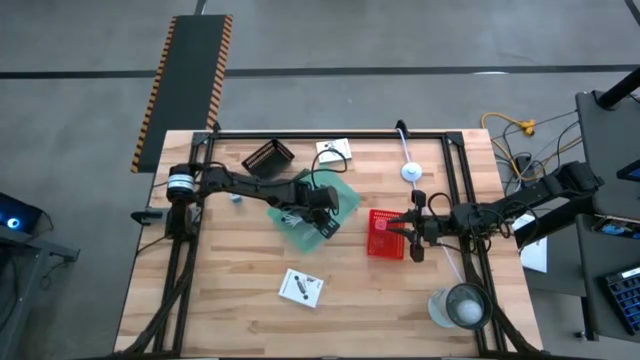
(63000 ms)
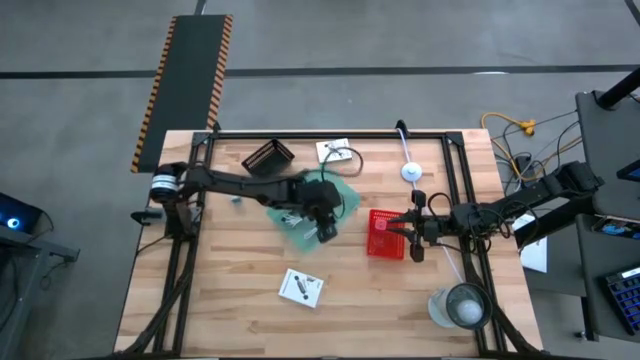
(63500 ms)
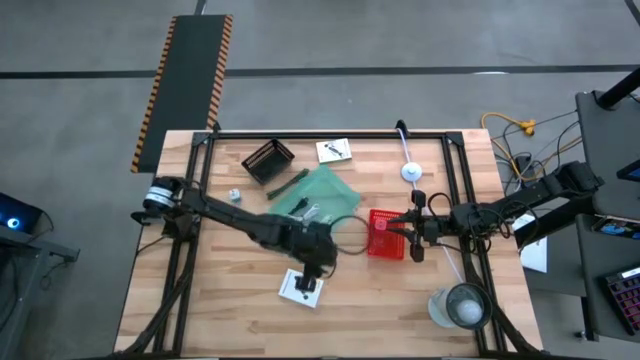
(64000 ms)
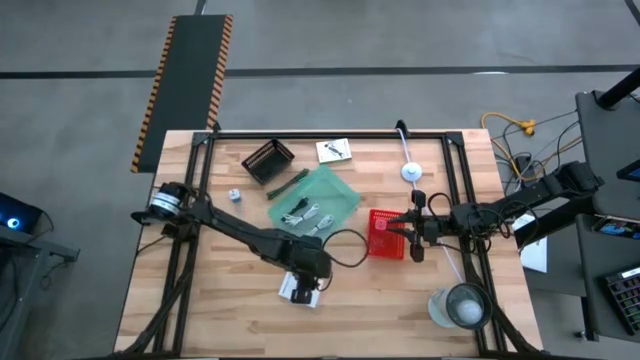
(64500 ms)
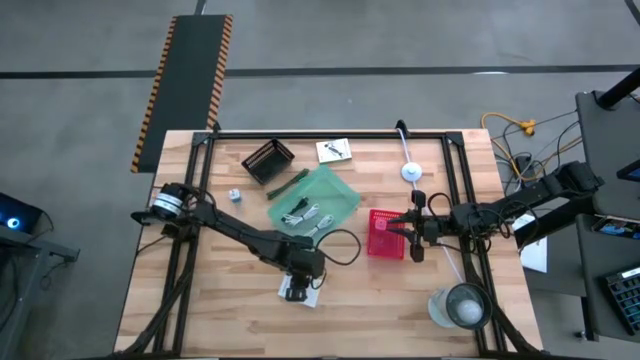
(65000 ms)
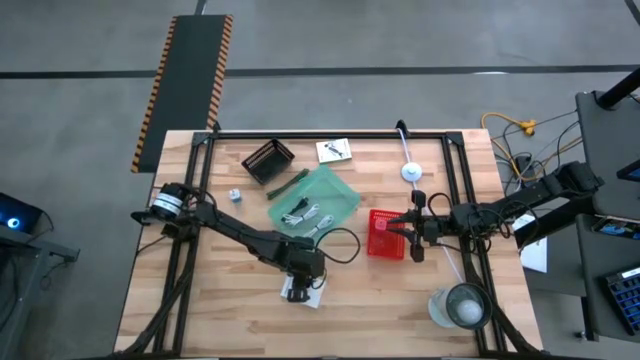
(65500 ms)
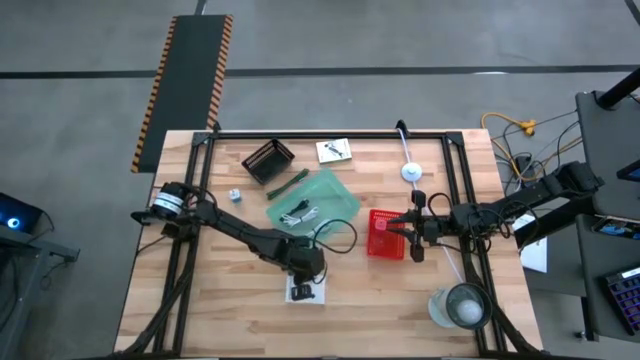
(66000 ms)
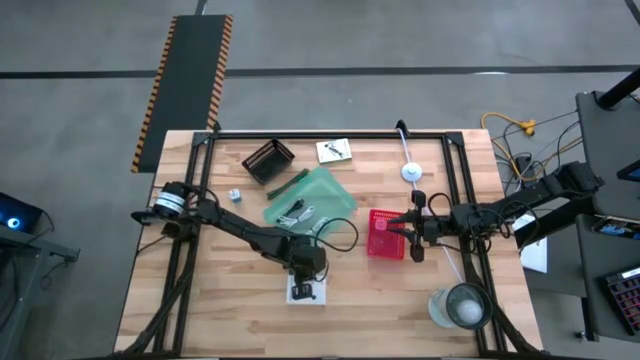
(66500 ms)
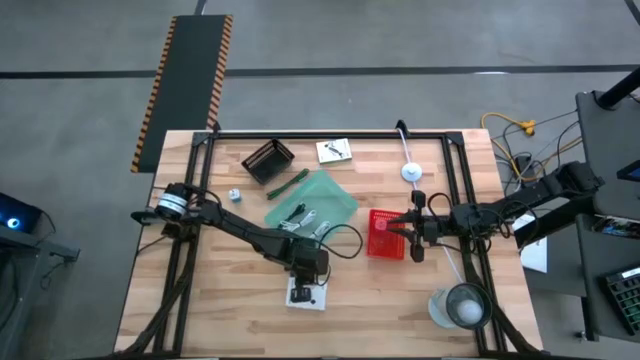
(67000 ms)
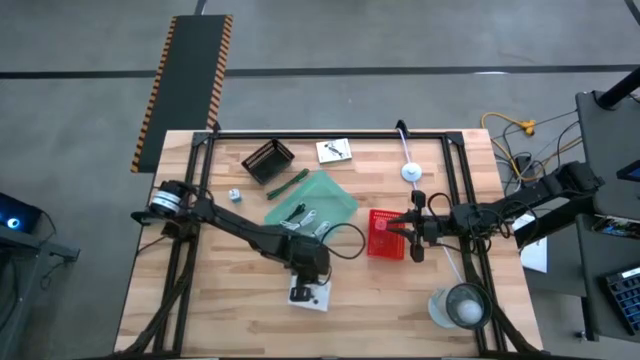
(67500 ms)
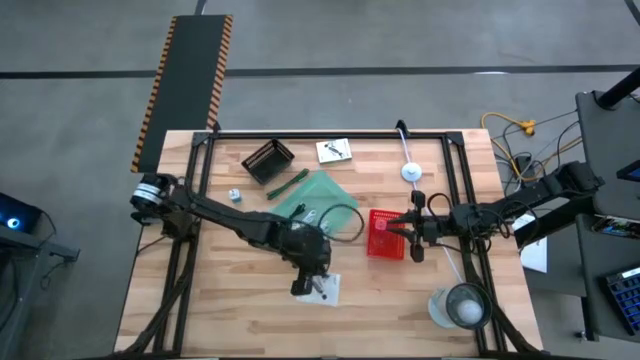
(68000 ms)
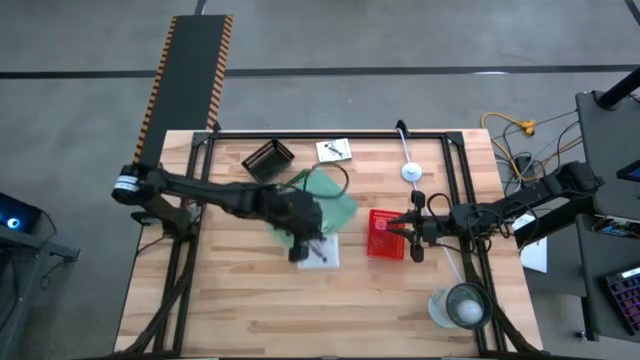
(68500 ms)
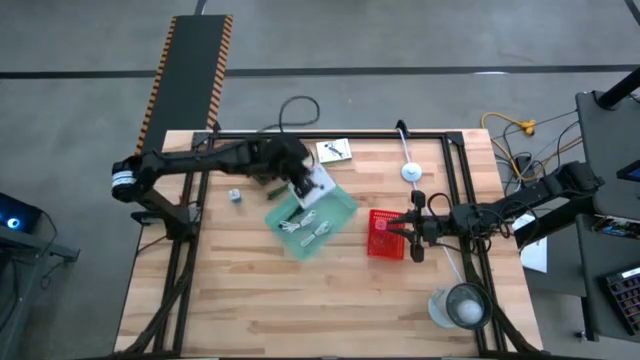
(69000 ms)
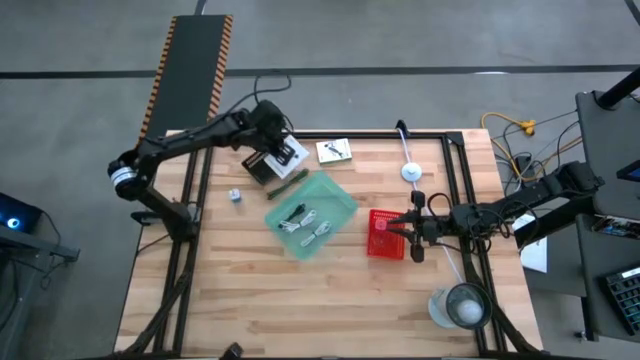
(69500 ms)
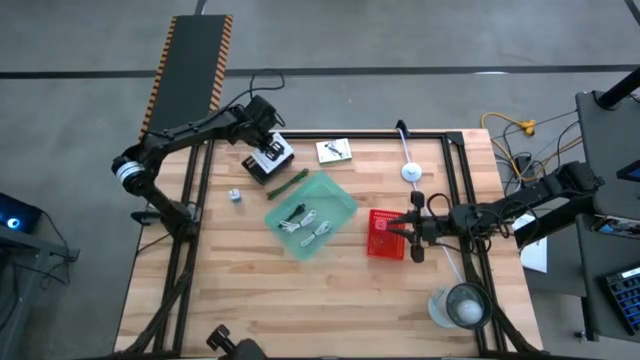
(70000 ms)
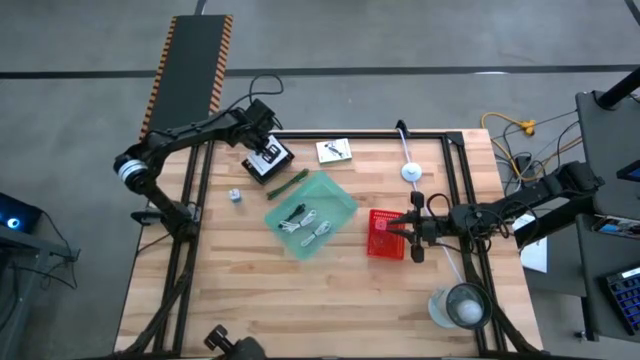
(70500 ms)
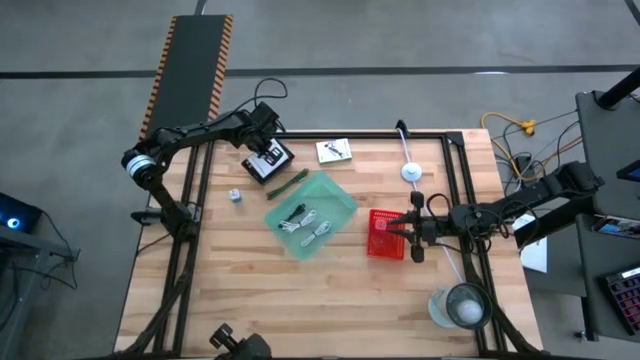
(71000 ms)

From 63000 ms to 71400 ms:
Task: Pick and place items into bin
Put the bottom white card reader box into the black bin

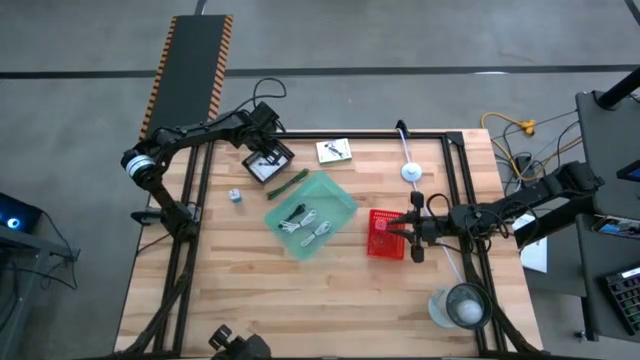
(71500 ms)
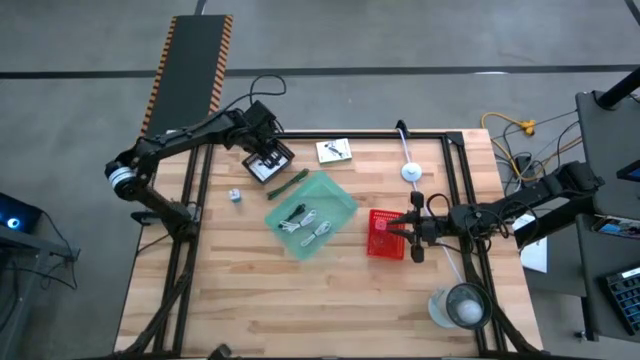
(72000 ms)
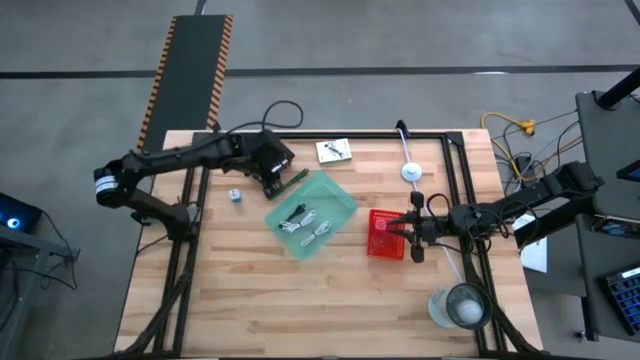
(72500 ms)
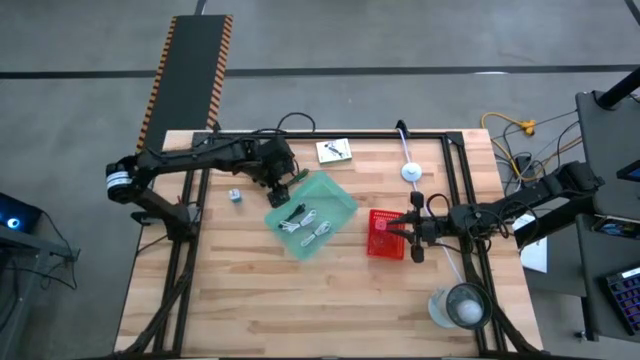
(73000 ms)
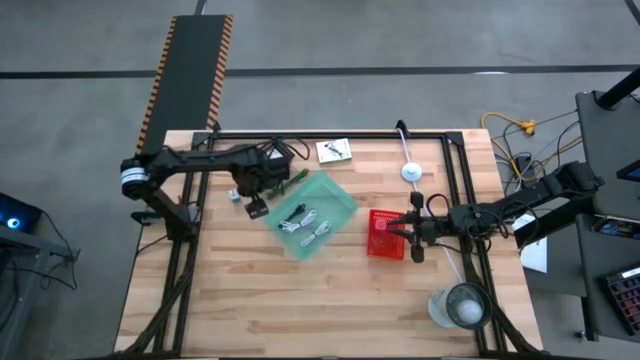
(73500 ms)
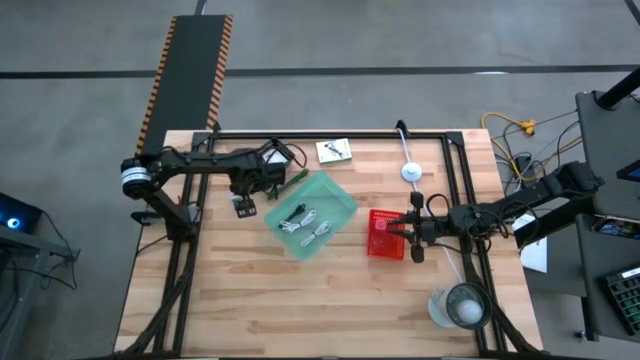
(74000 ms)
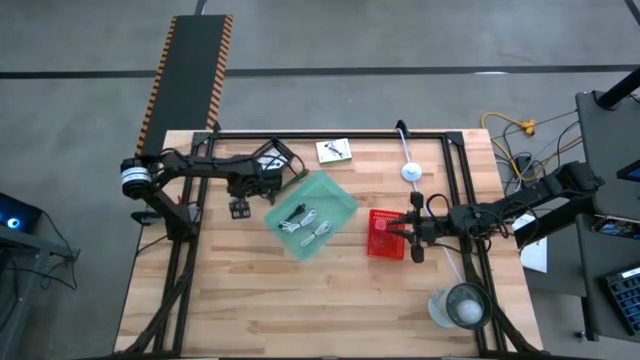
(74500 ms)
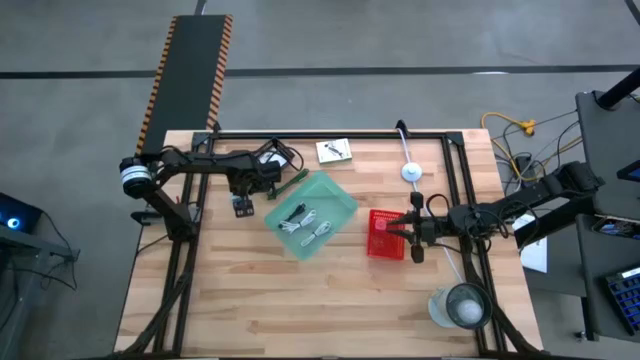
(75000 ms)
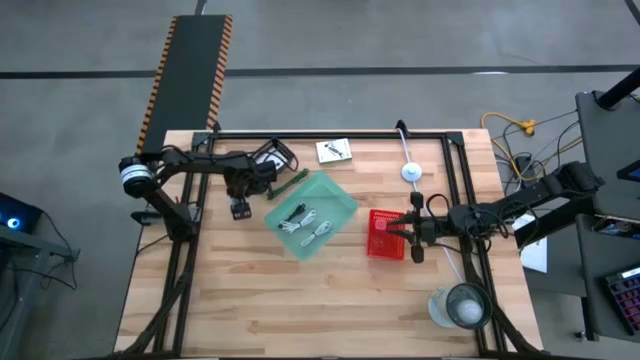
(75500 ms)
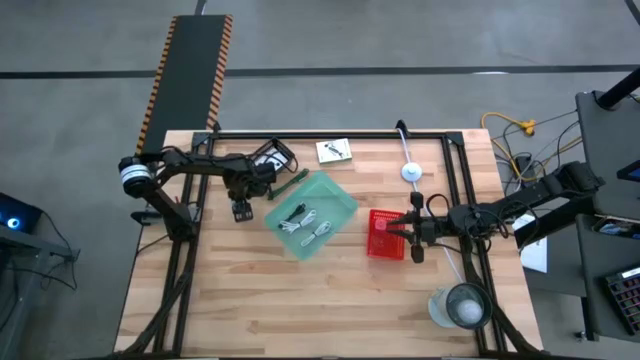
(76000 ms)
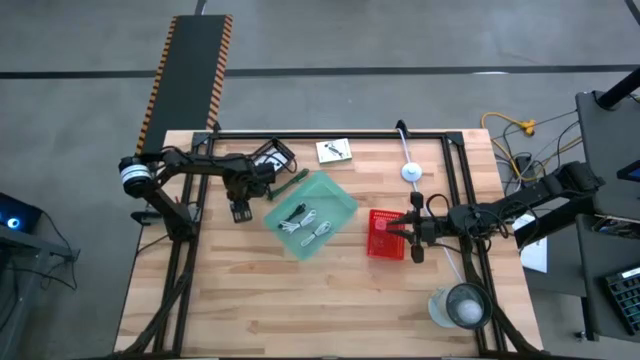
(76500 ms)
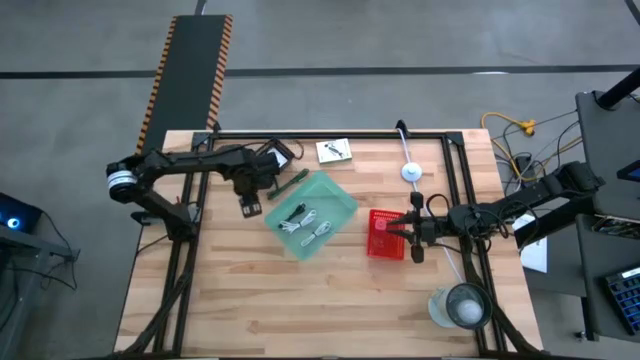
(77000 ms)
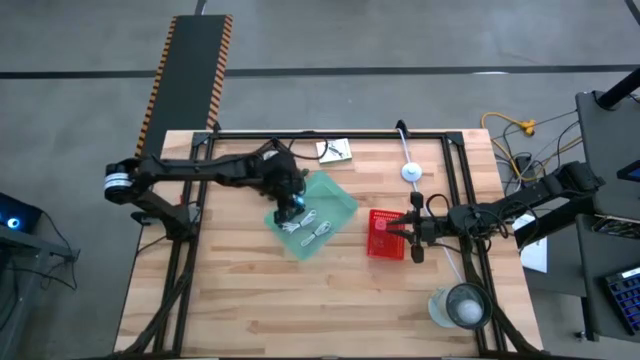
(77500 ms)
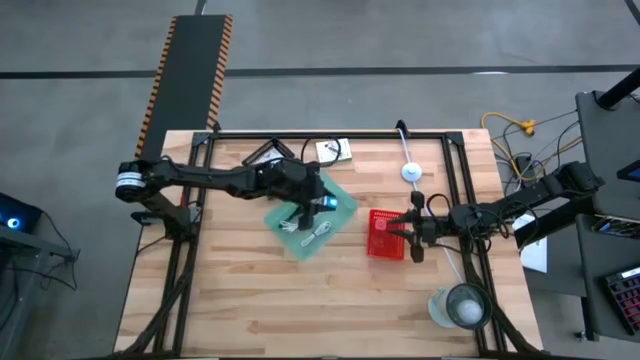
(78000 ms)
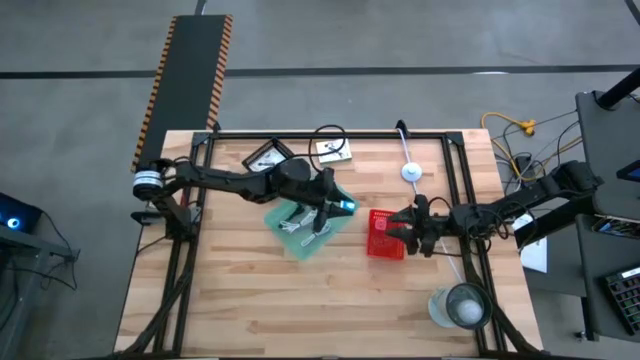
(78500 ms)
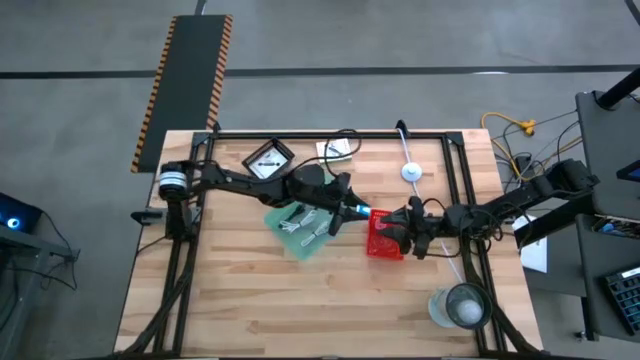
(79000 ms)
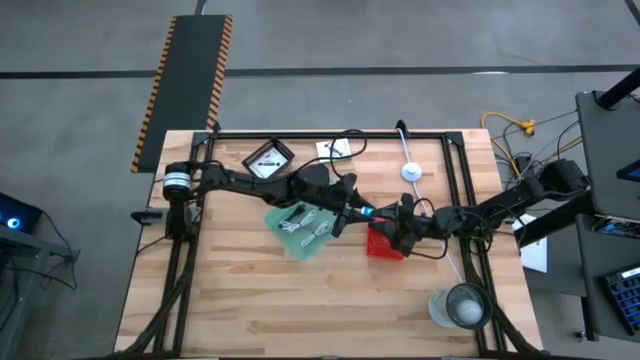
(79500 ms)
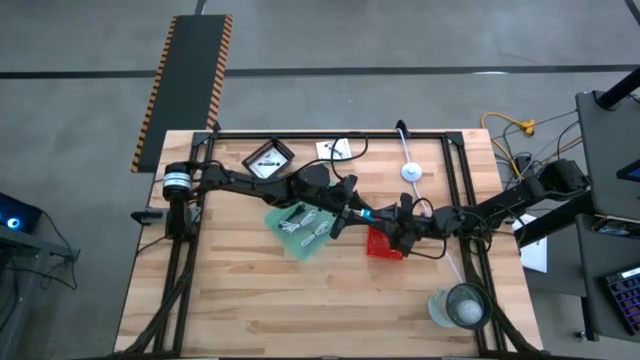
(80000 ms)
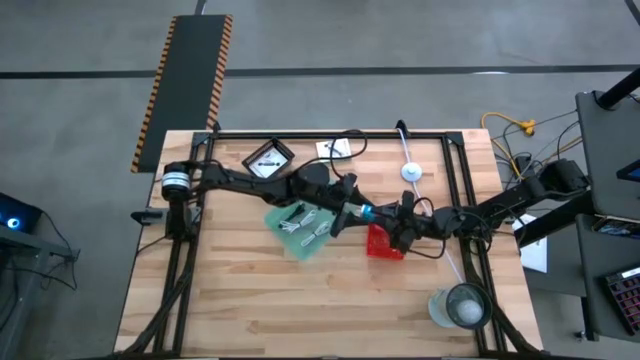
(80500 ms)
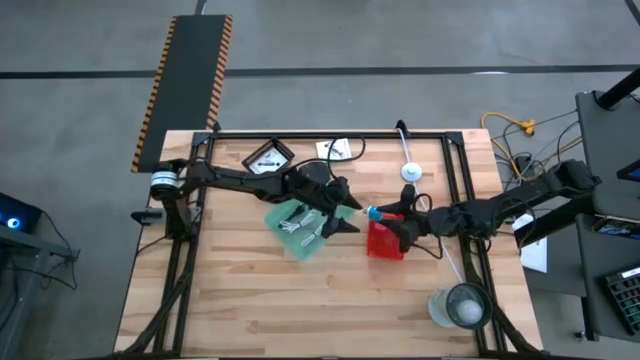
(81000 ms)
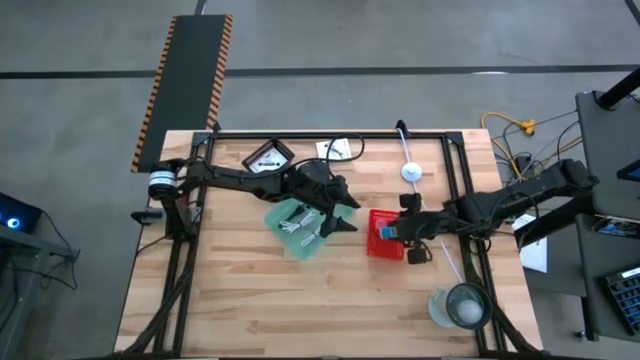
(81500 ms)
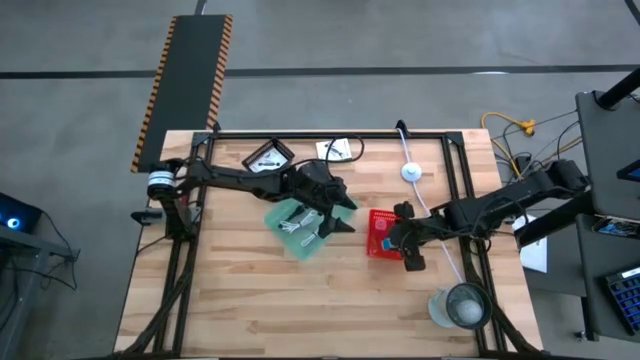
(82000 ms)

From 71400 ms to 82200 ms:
Put the blue charger adapter into the red bin

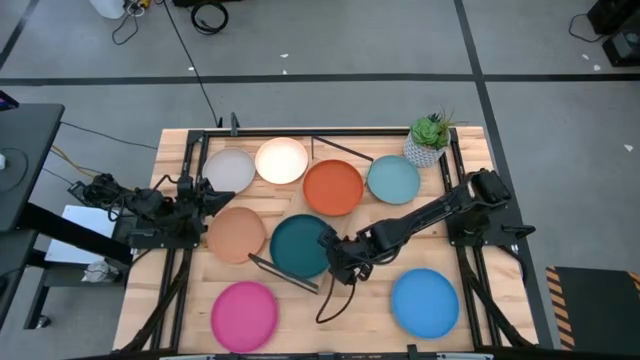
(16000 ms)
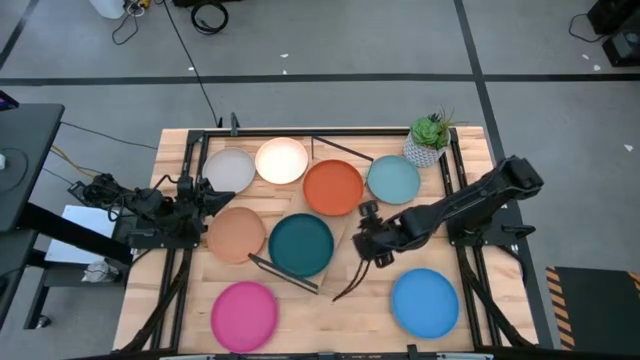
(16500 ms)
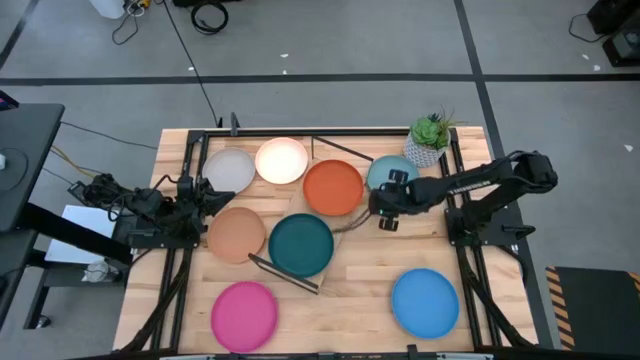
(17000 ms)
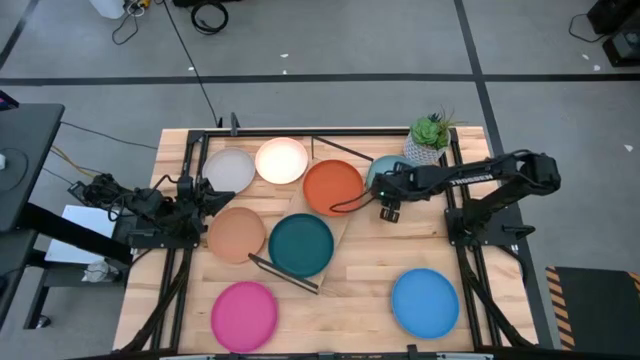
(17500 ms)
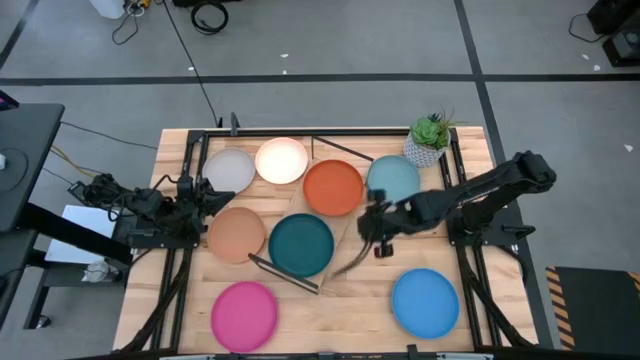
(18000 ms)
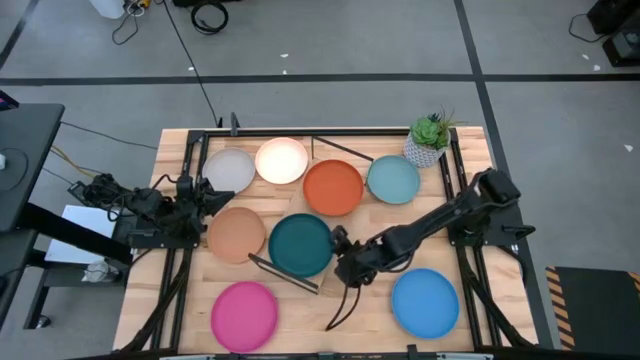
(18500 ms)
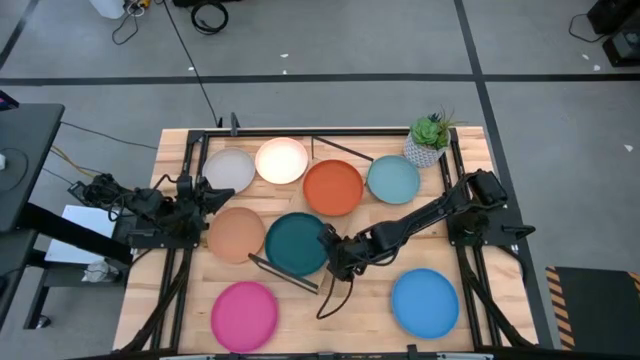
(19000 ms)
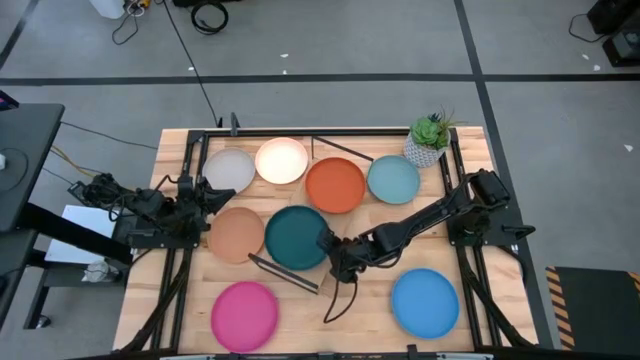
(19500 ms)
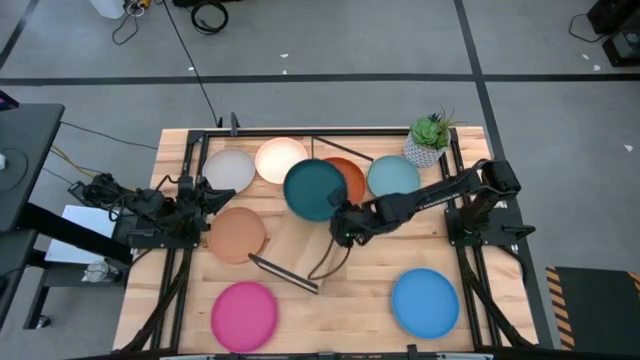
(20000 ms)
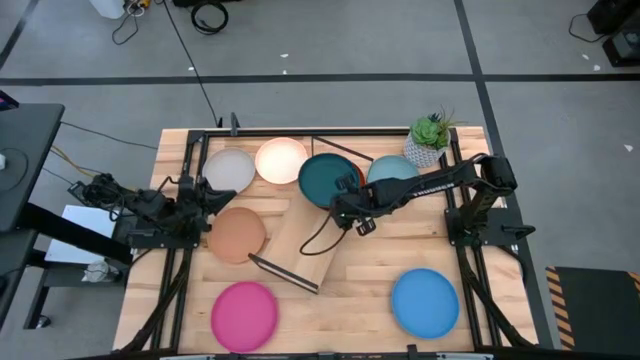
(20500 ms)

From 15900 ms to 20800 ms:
Task: Place and stack plates onto a shelf
Stack the dark green plate on the orange plate
